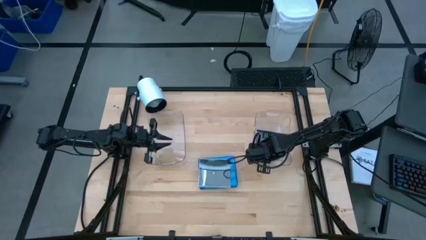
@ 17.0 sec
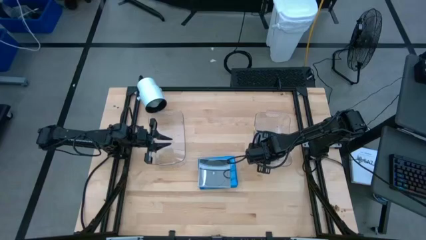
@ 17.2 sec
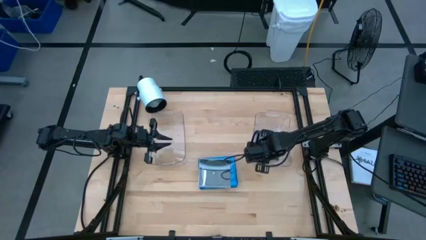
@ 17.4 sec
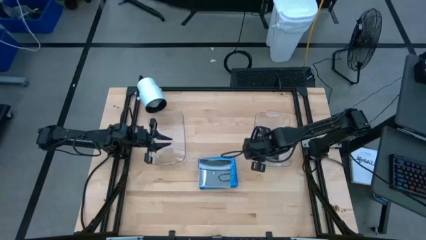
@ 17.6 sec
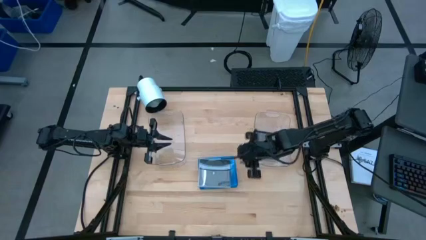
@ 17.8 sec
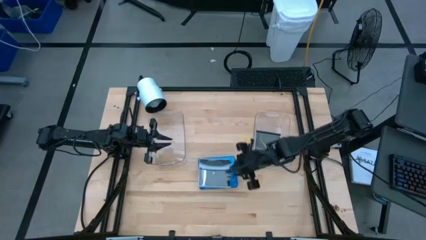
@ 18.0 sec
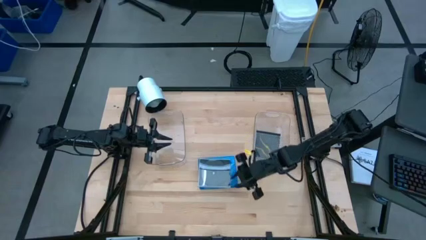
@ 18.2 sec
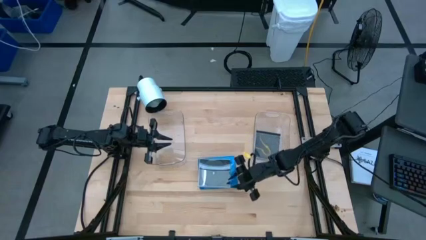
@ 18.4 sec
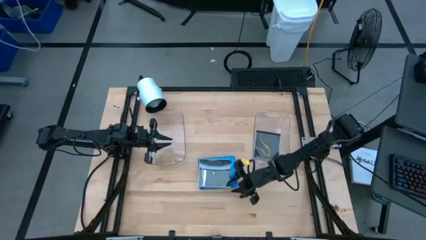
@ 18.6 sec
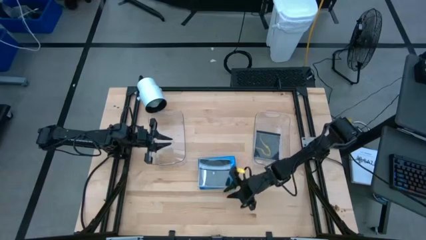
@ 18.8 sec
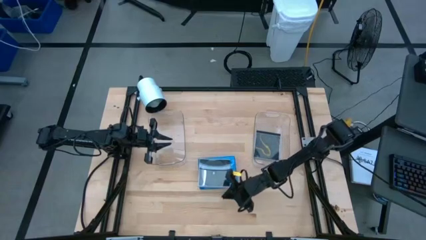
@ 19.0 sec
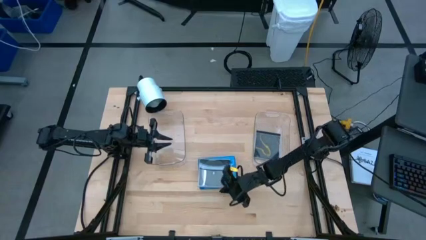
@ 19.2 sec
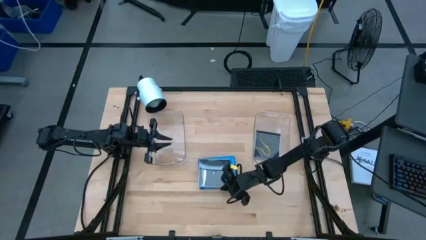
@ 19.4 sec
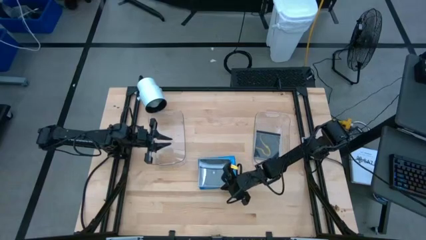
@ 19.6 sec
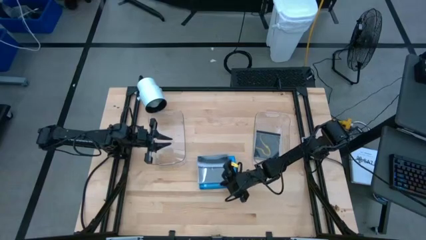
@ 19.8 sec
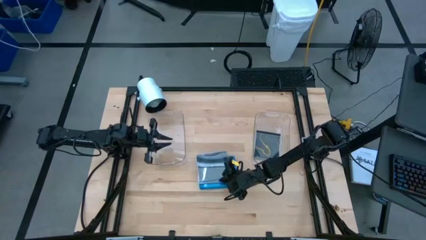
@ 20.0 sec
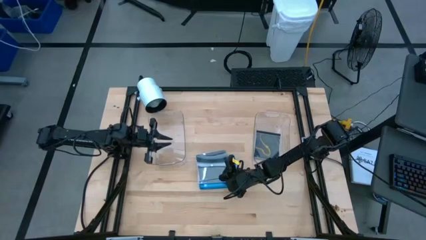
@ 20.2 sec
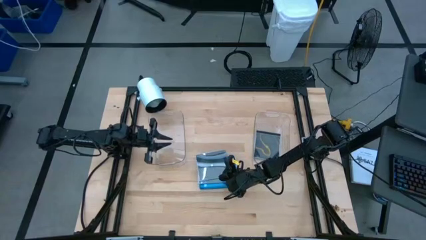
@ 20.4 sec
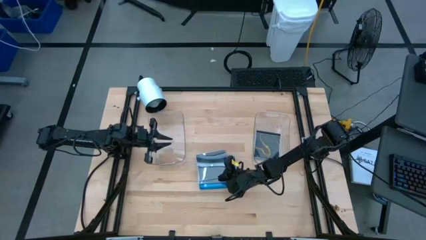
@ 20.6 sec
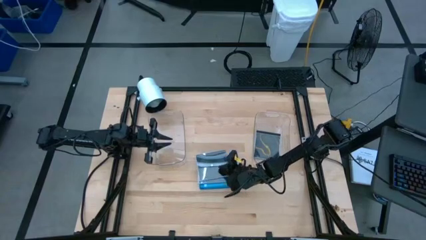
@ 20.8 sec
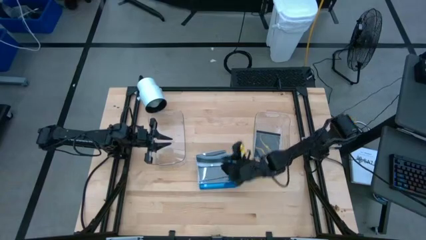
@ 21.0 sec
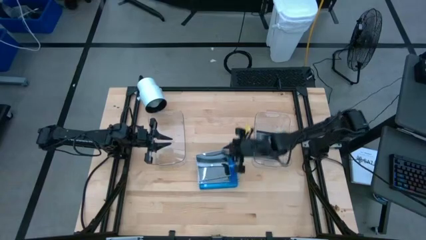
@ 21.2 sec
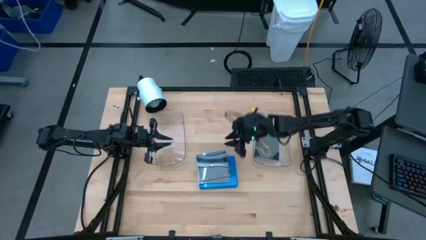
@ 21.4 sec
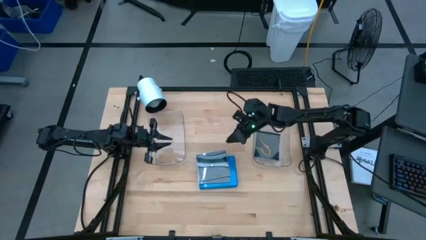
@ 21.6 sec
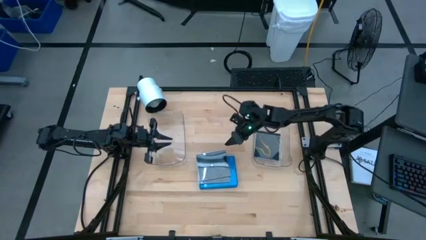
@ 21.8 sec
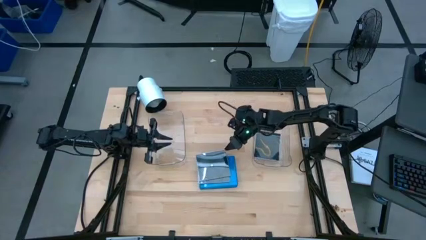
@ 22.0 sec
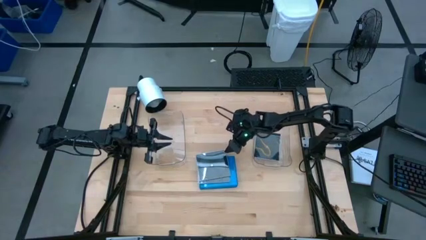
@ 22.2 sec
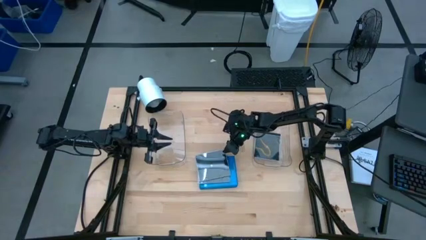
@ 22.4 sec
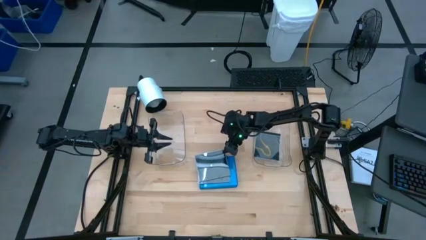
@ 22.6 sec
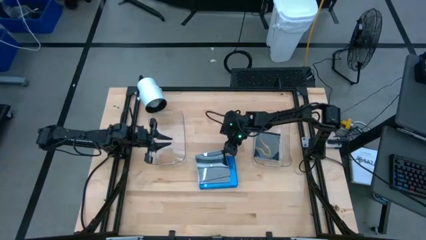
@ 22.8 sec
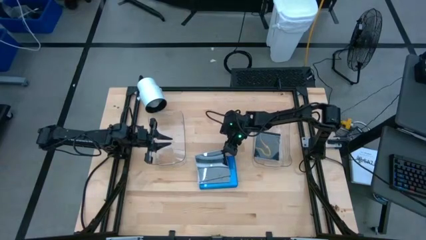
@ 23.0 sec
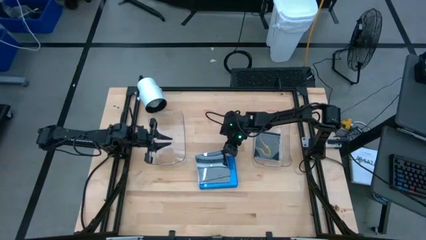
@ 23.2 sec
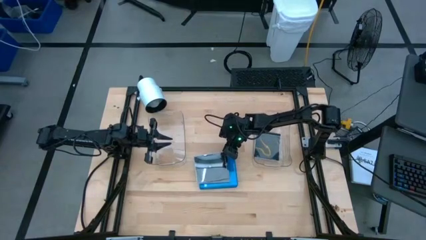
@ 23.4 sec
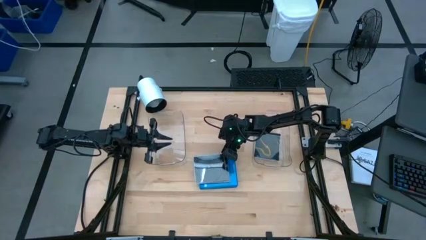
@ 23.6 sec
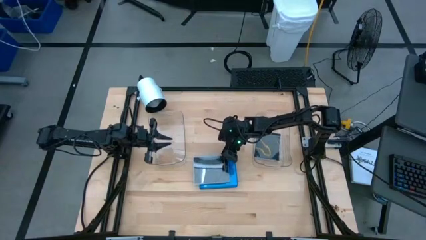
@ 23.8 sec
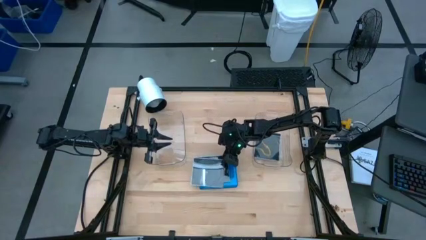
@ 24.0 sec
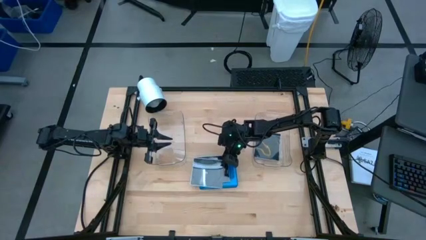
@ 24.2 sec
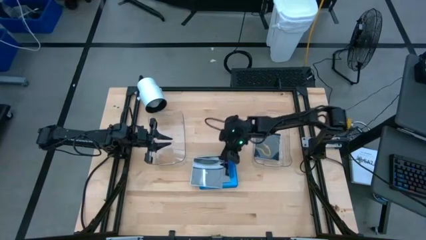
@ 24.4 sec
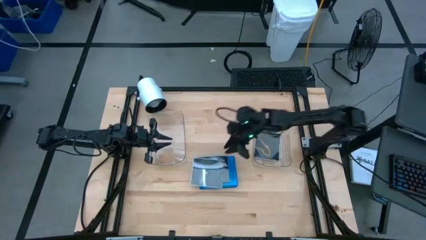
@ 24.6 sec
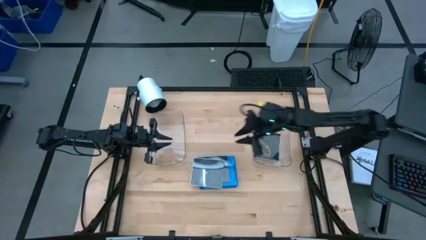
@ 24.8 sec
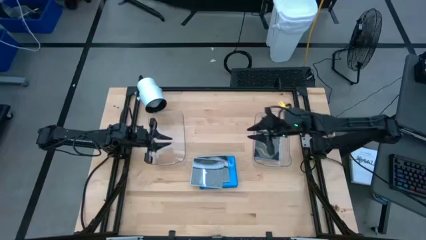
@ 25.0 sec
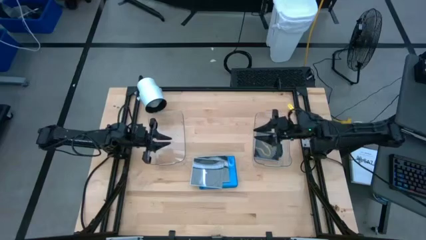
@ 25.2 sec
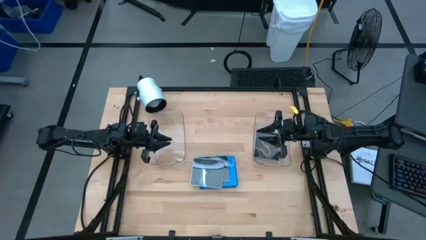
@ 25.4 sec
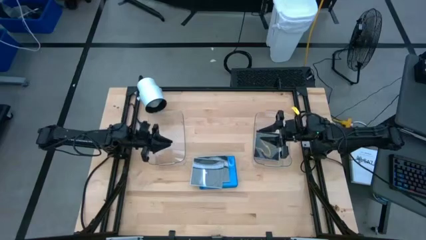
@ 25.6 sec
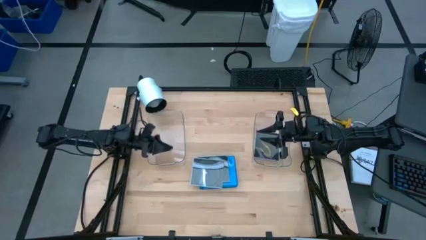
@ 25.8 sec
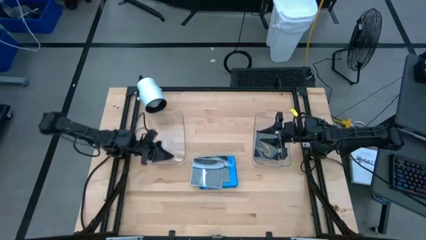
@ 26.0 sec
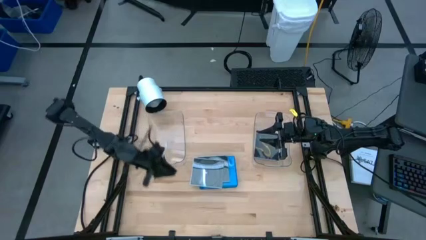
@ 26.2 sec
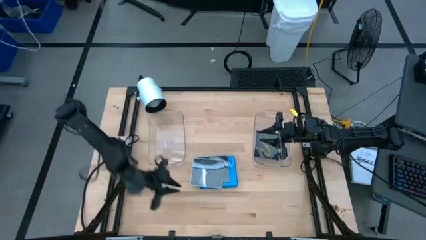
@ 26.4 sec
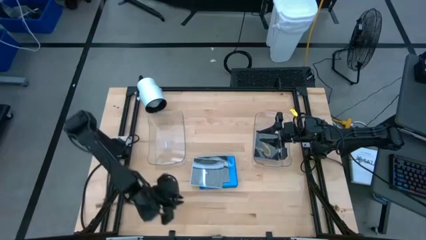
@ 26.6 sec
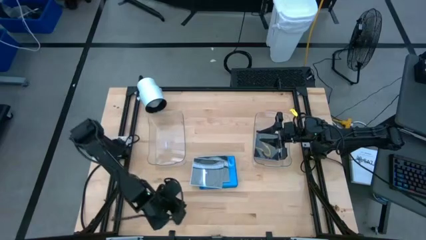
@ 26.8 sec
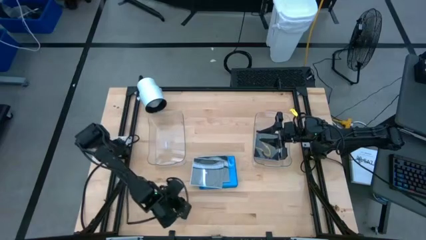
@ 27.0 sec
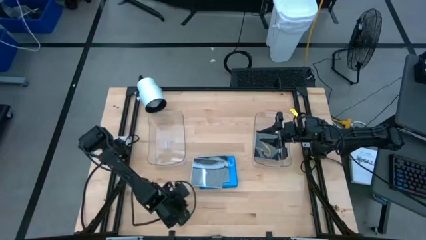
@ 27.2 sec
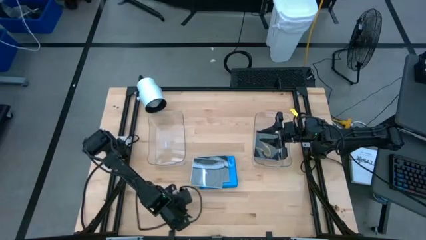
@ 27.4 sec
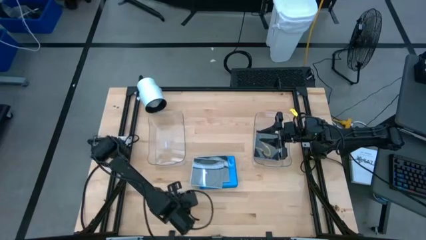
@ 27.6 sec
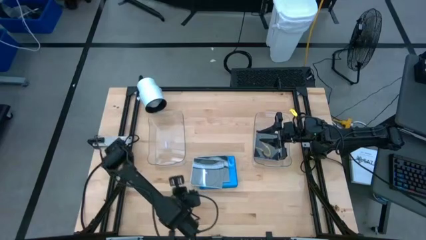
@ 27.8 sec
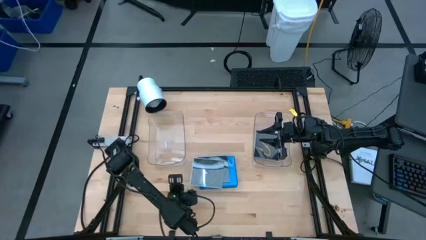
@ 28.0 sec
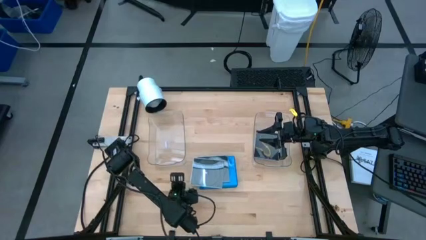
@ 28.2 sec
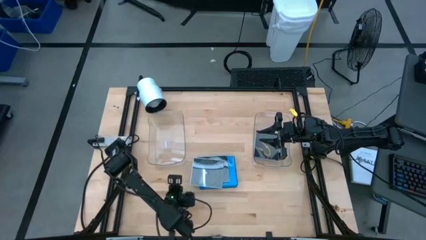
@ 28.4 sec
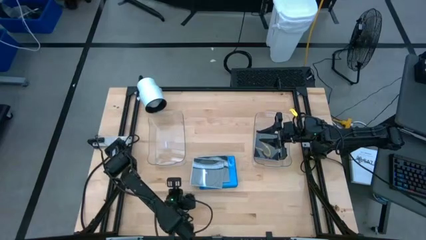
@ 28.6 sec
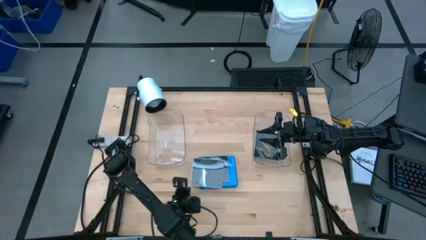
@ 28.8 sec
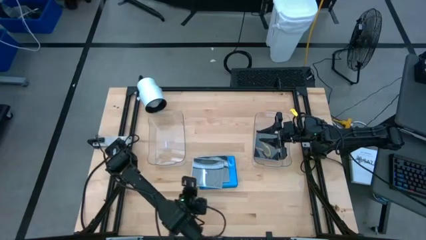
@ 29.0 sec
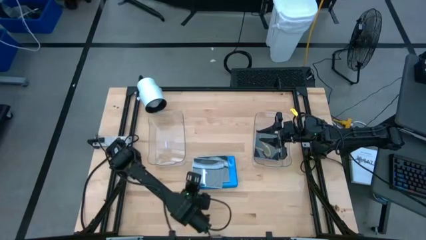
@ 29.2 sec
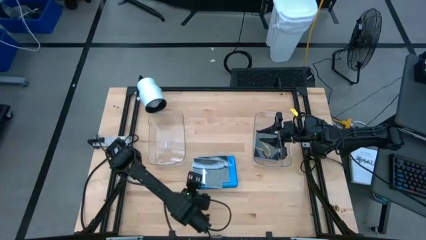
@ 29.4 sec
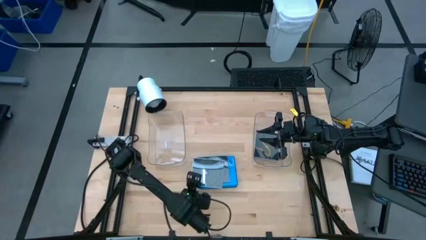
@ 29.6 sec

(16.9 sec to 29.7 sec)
Task: Pick & place jewel cases by type
Put the black CD case into the right transparent bin
